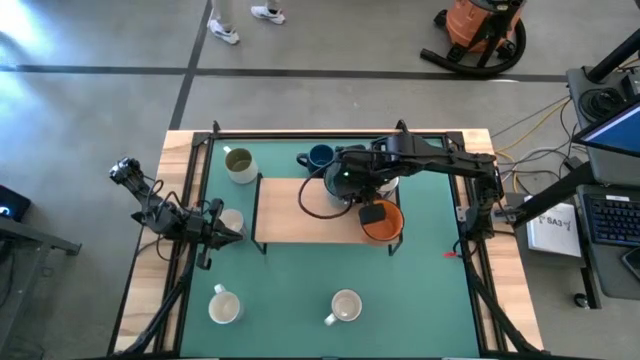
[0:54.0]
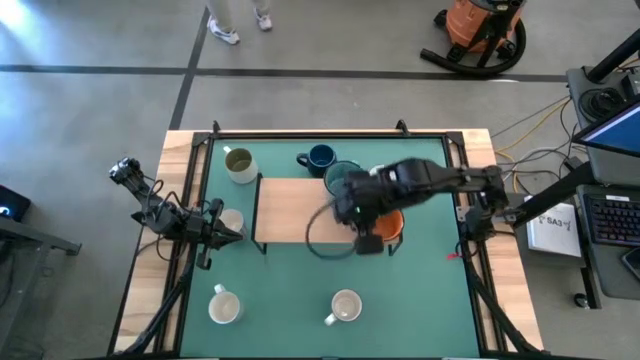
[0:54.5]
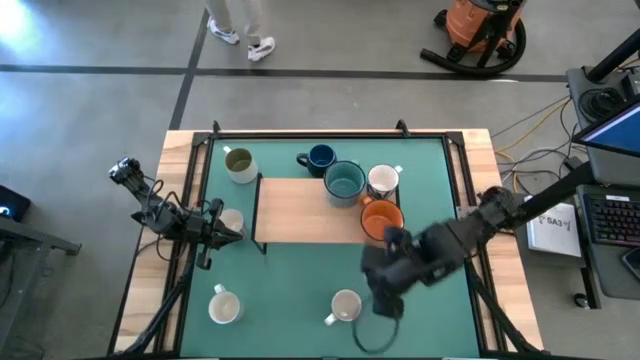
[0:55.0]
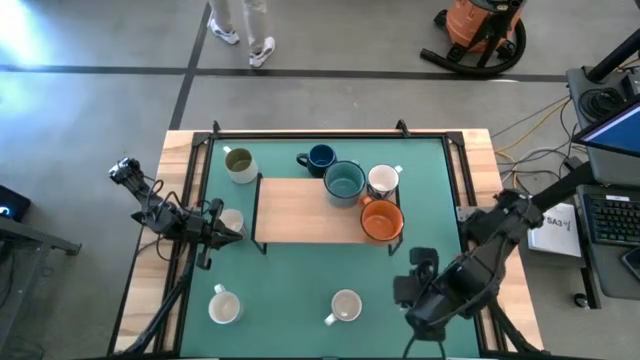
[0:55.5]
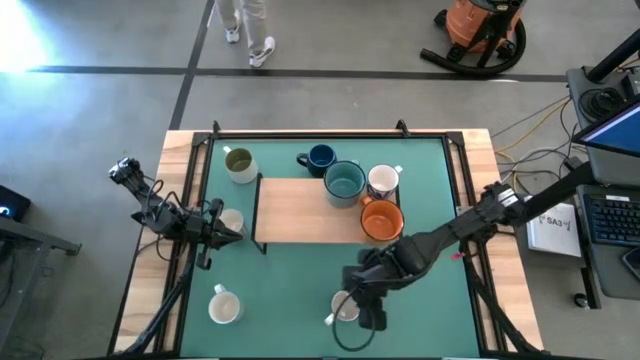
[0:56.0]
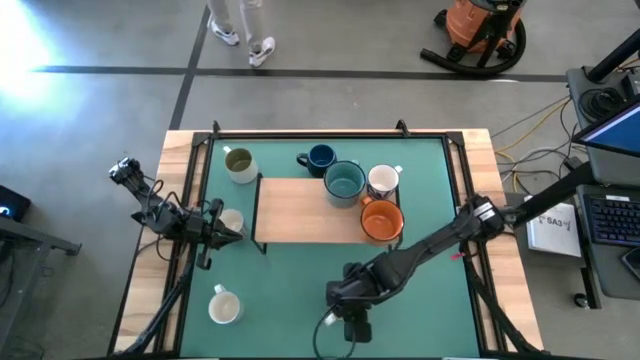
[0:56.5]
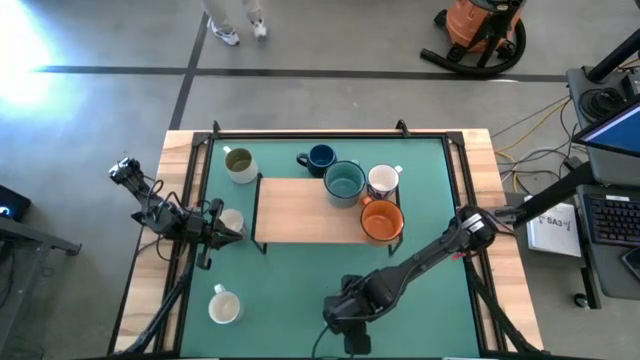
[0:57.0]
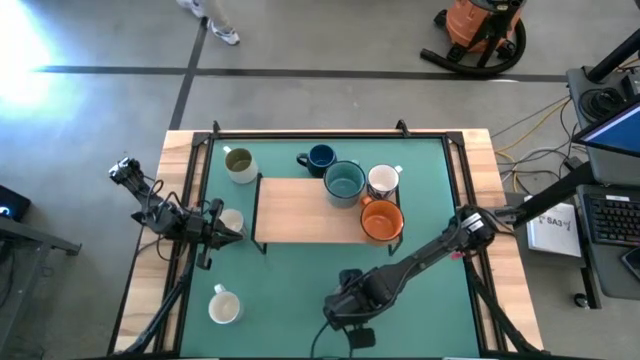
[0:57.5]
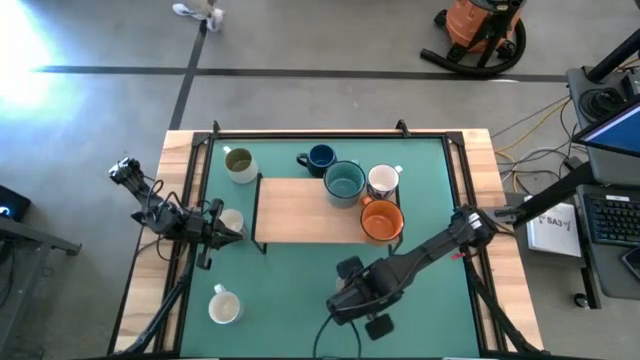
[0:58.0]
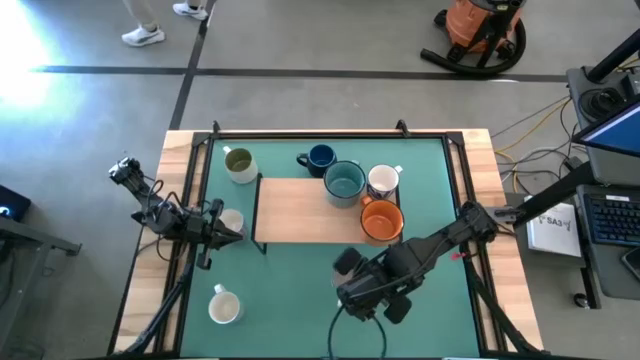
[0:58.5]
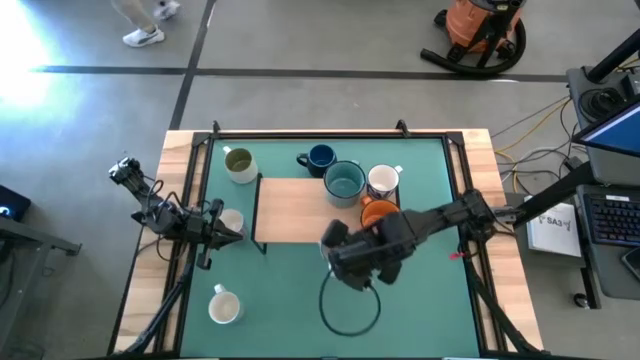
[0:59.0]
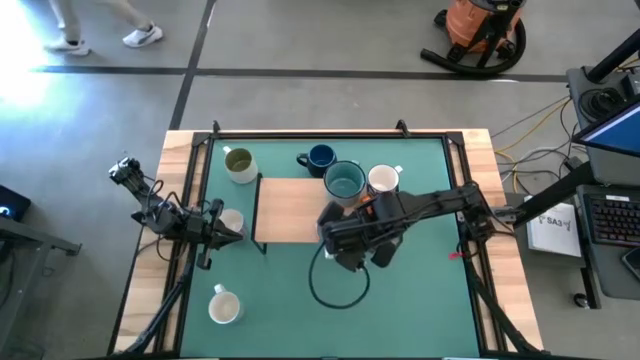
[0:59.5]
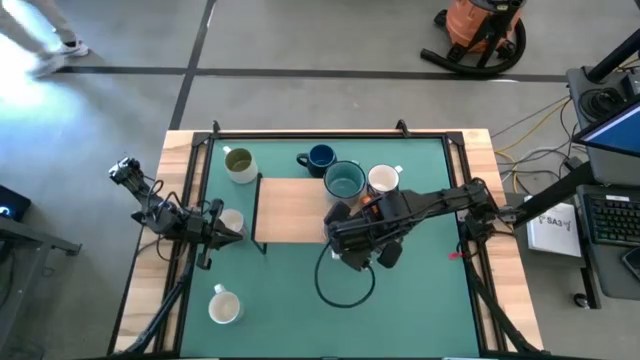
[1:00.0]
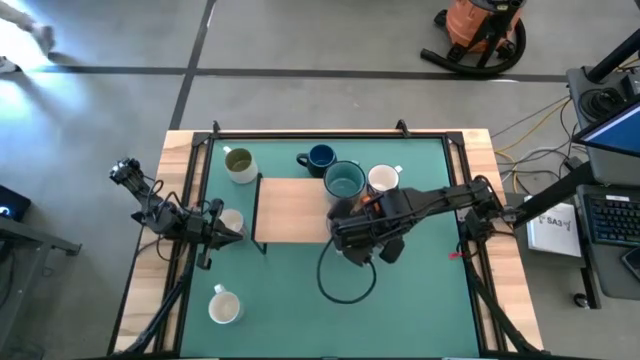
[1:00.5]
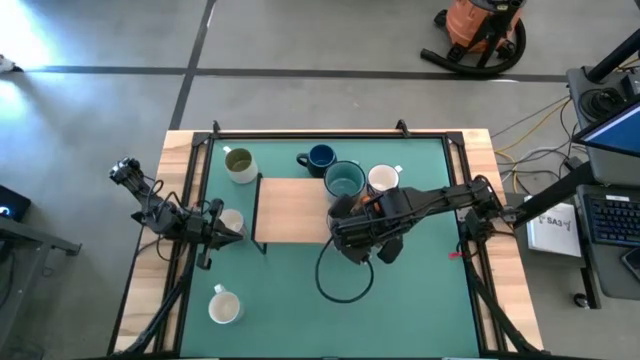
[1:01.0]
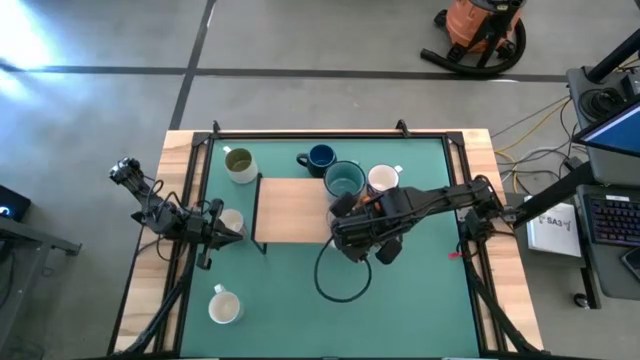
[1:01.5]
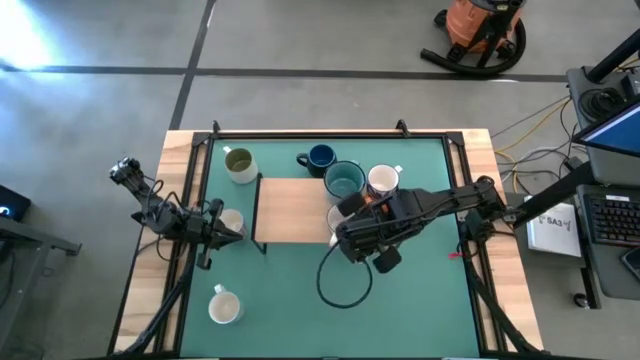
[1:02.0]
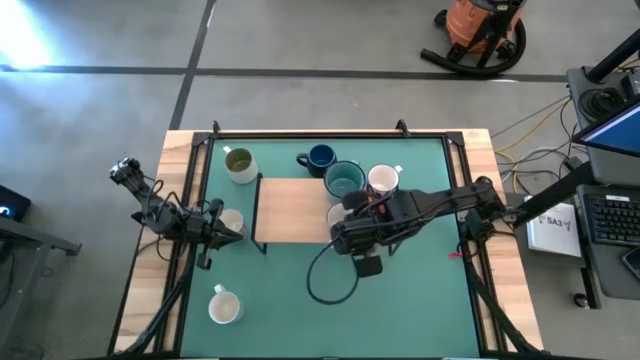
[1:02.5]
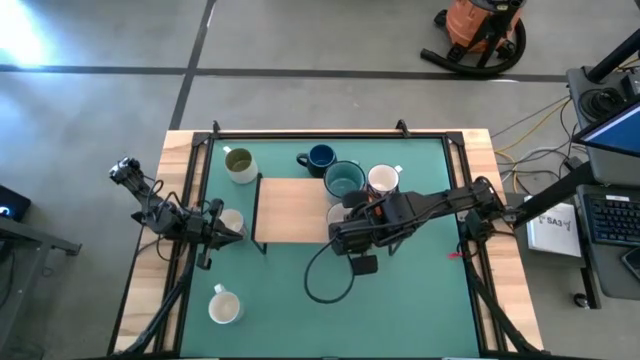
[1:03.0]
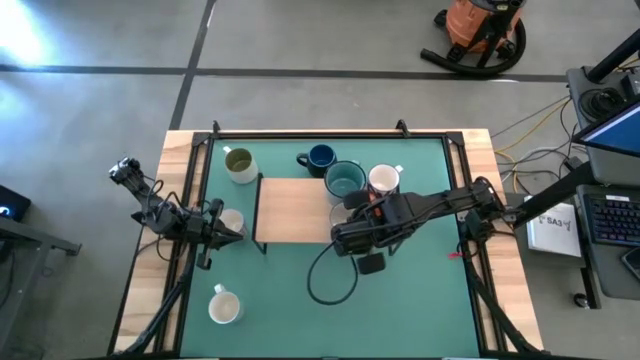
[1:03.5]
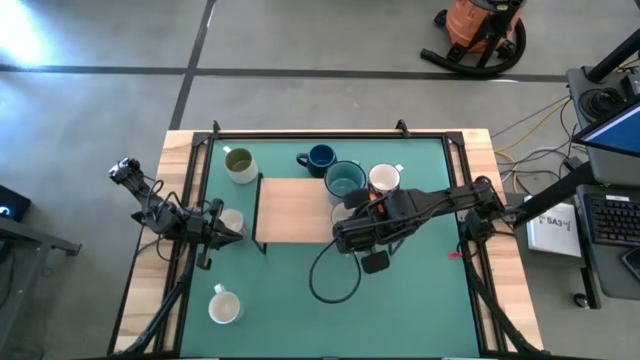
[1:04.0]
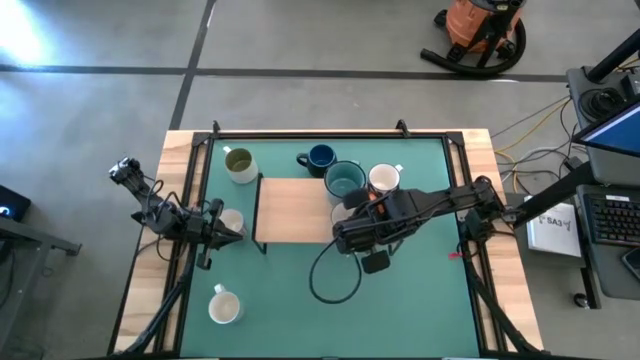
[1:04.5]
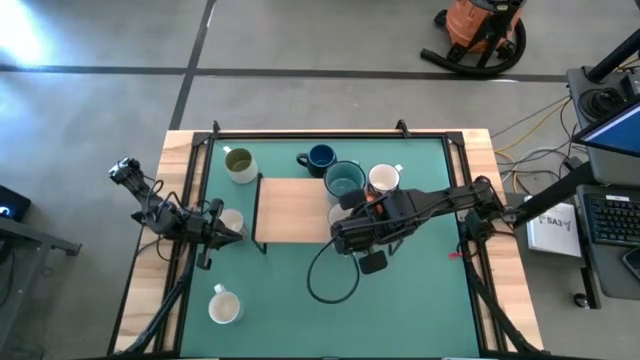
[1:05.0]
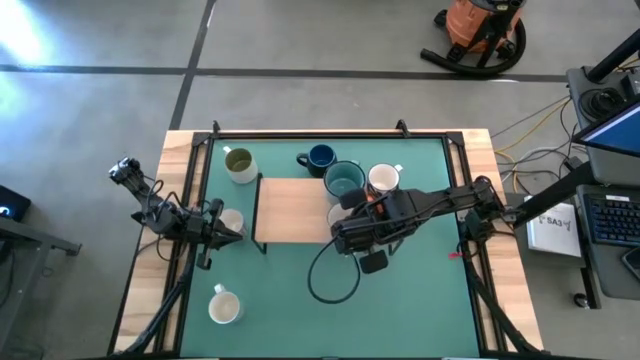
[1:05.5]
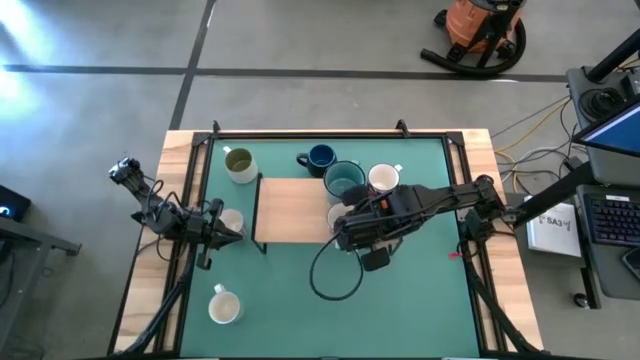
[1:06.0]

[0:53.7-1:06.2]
Task: Place coffee mugs
Put the white blue mug on the shelf

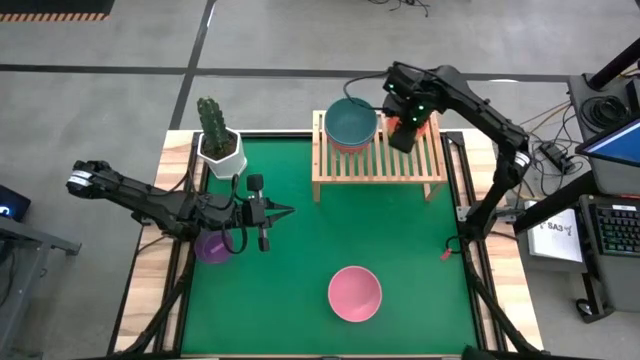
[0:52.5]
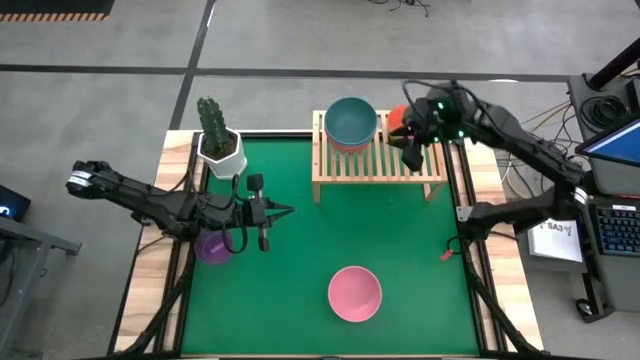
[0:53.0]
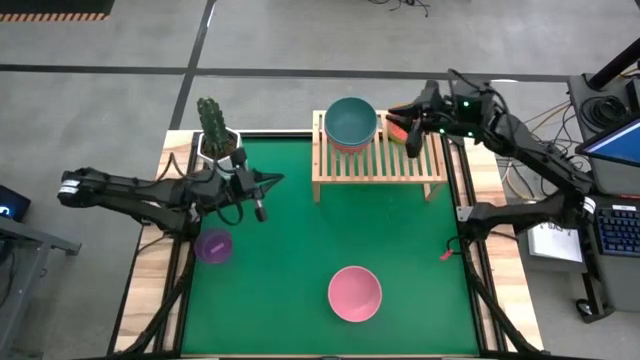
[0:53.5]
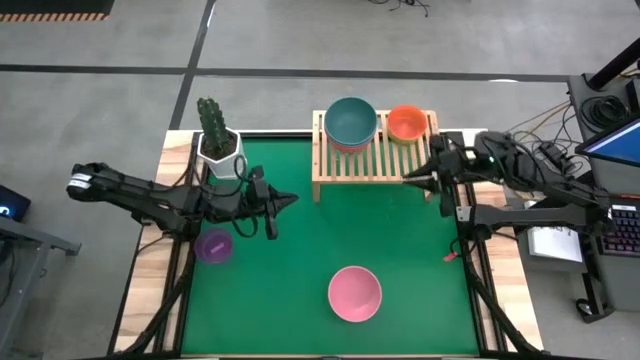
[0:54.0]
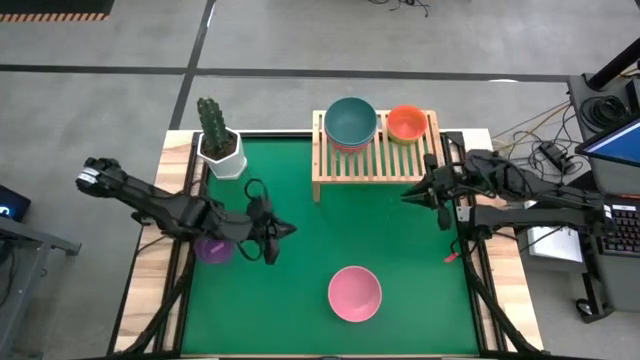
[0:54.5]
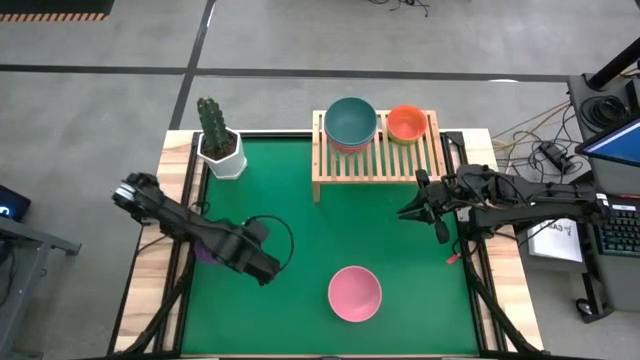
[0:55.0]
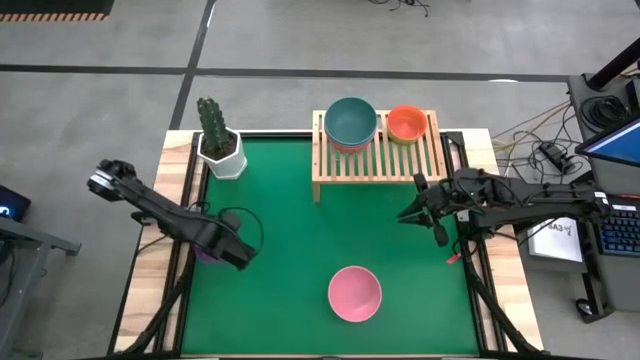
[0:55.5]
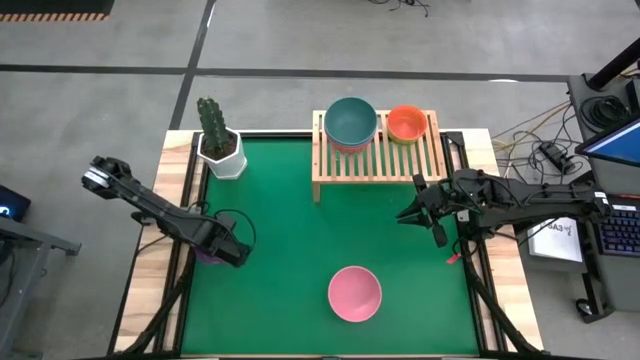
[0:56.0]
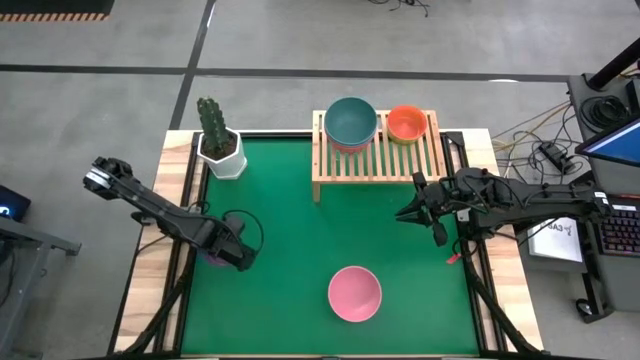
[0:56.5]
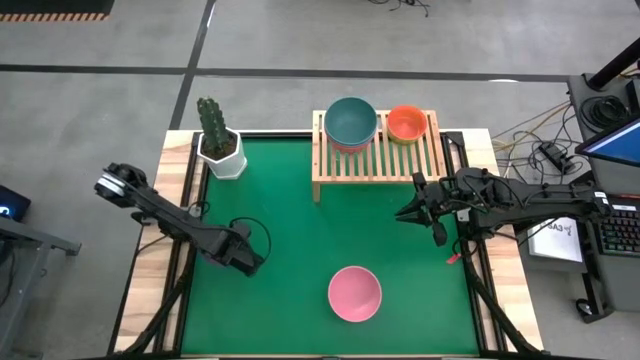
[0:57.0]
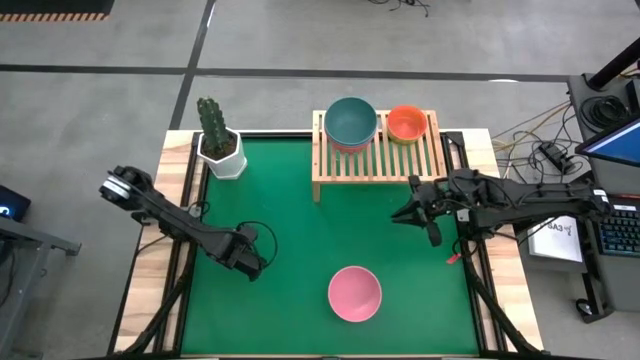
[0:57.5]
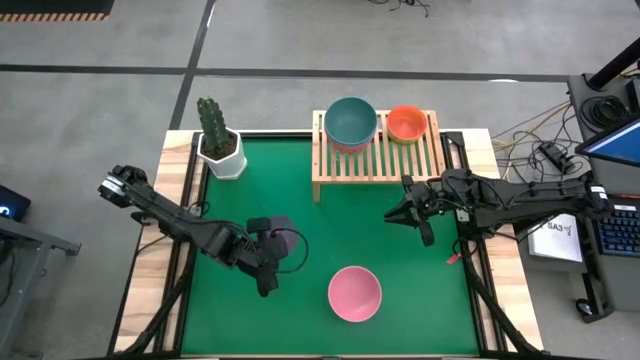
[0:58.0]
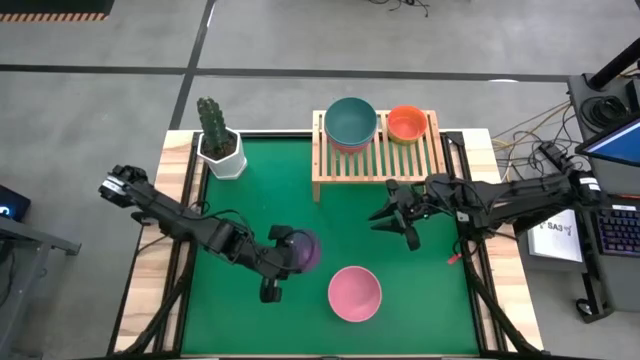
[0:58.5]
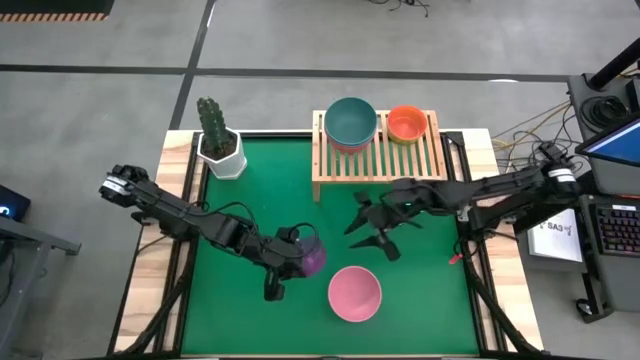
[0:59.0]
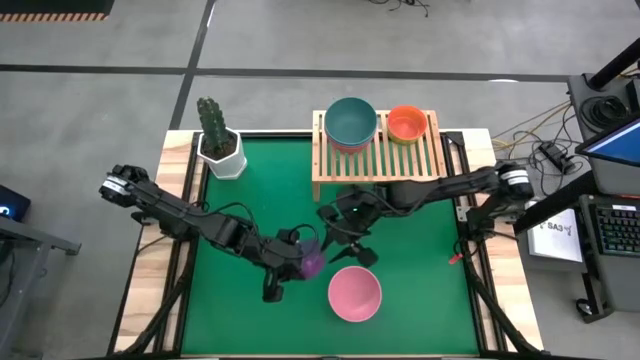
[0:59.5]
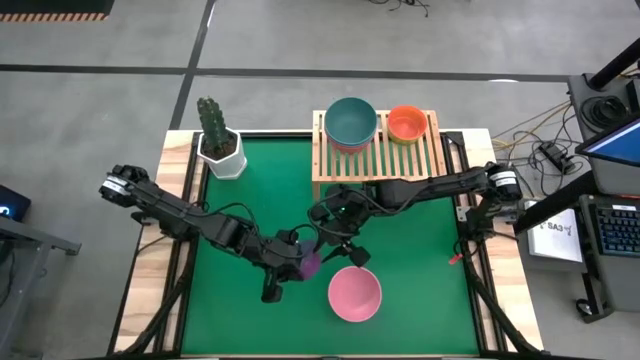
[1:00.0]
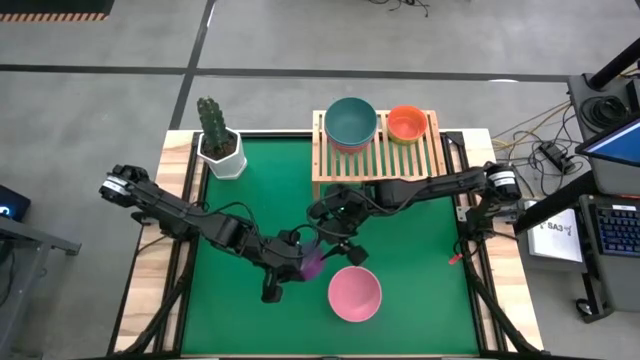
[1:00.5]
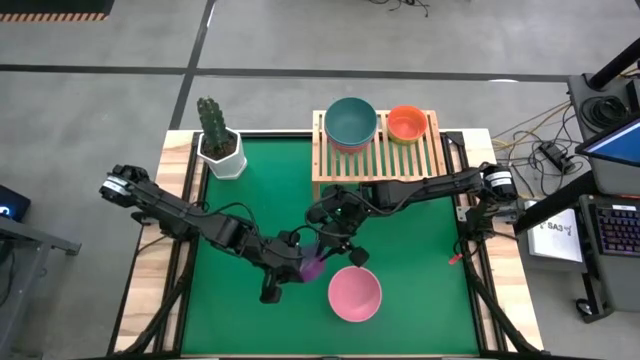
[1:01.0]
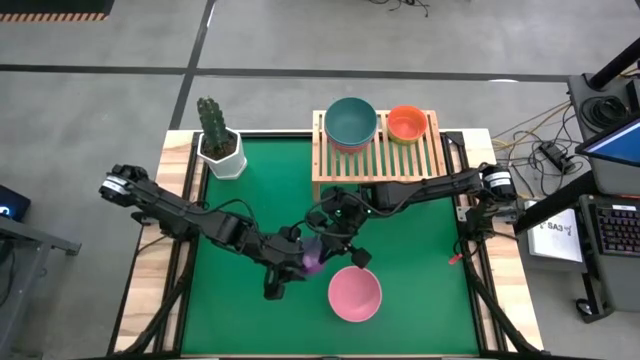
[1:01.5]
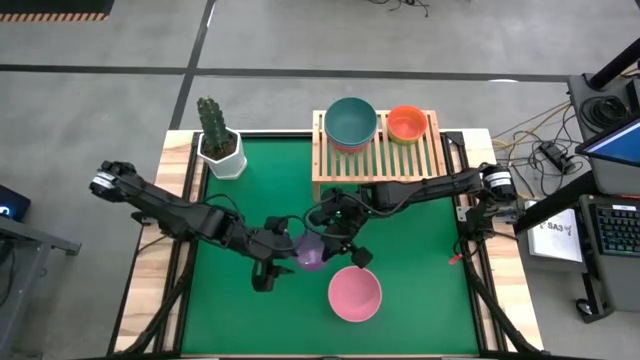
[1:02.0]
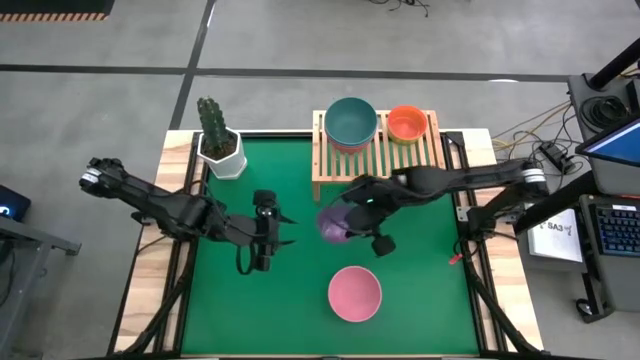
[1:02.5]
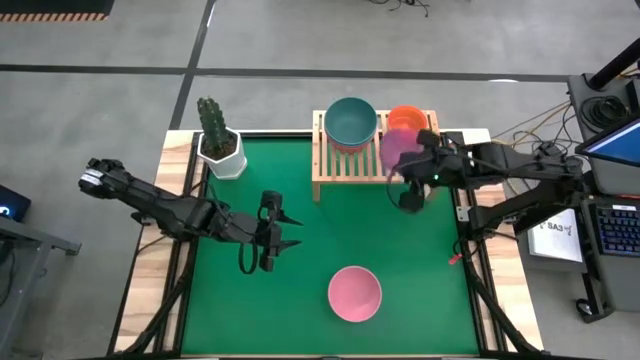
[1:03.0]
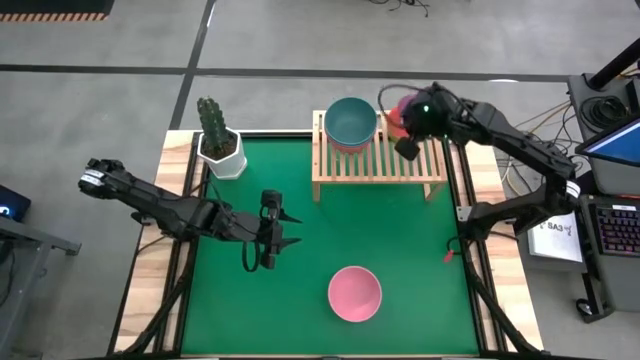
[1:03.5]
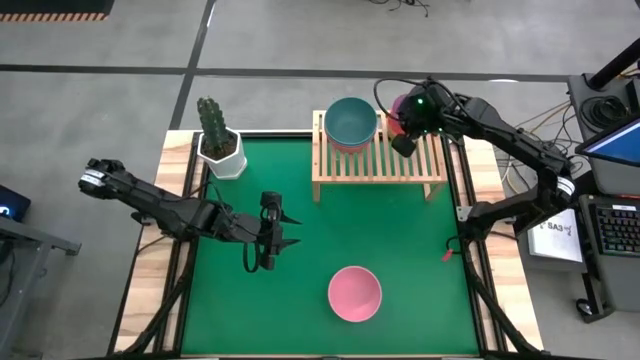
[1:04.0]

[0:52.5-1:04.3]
Task: Place and stack bowls onto a shelf
Stack the violet bowl on top of the orange bowl on the shelf
